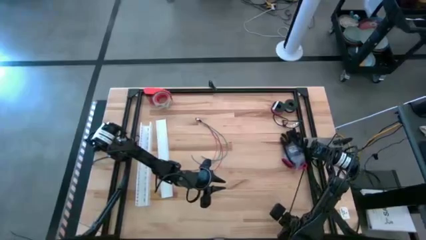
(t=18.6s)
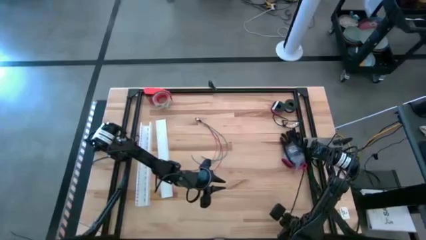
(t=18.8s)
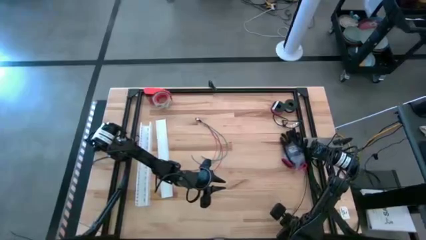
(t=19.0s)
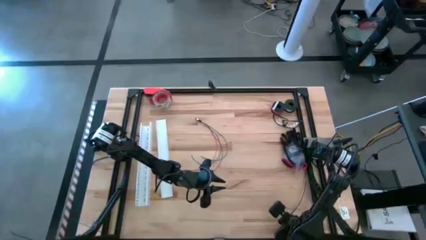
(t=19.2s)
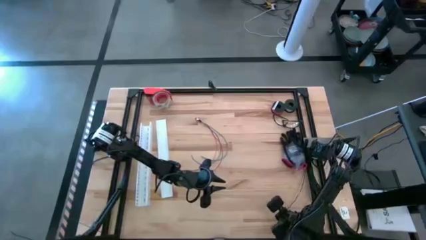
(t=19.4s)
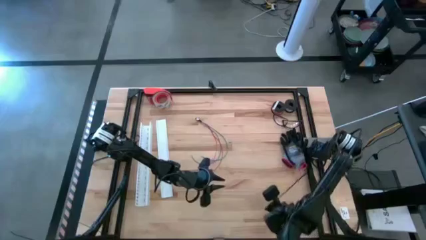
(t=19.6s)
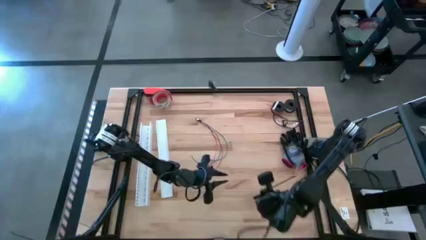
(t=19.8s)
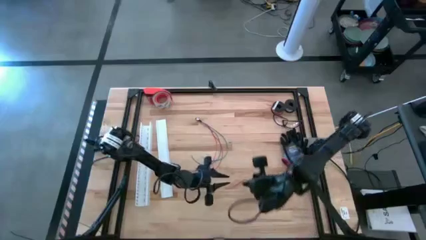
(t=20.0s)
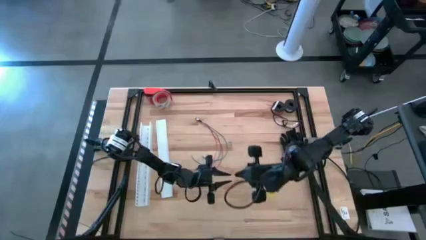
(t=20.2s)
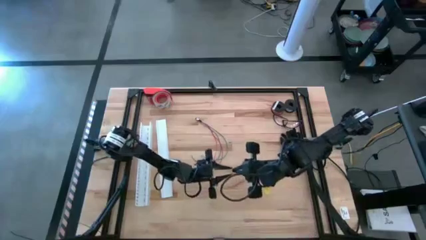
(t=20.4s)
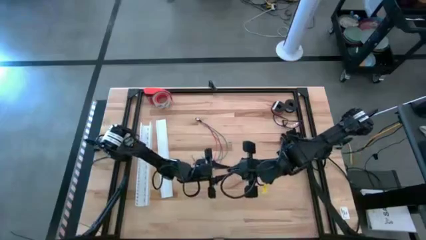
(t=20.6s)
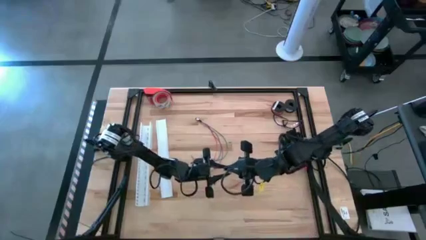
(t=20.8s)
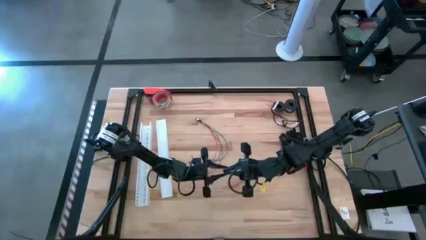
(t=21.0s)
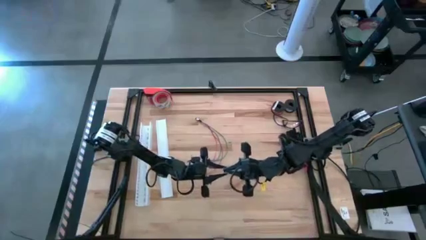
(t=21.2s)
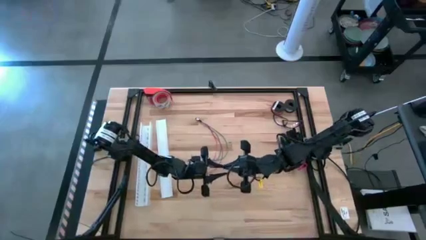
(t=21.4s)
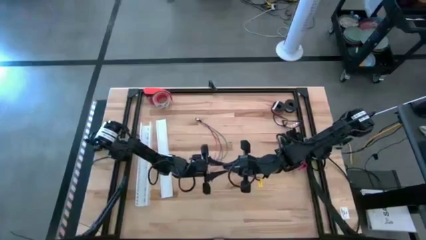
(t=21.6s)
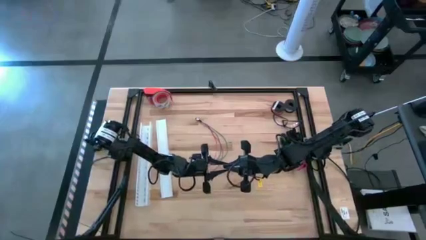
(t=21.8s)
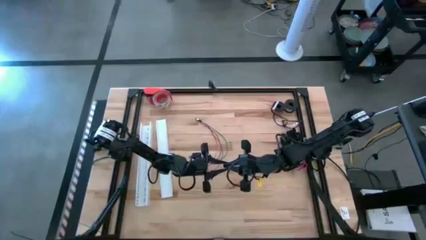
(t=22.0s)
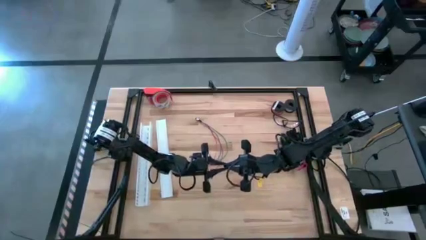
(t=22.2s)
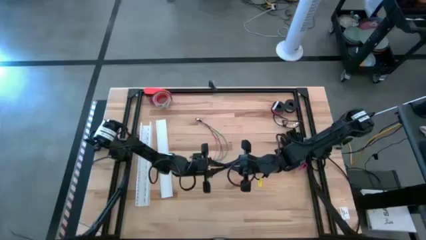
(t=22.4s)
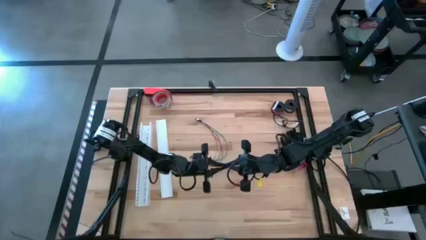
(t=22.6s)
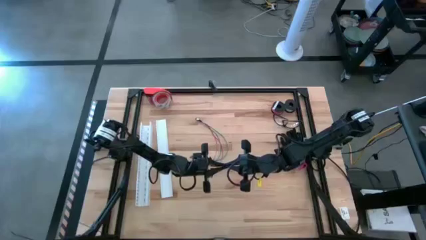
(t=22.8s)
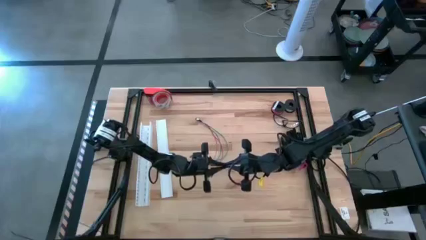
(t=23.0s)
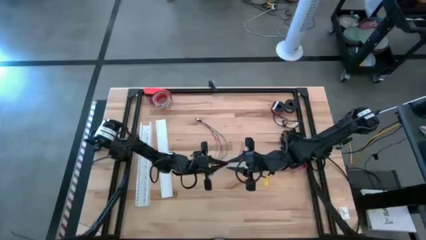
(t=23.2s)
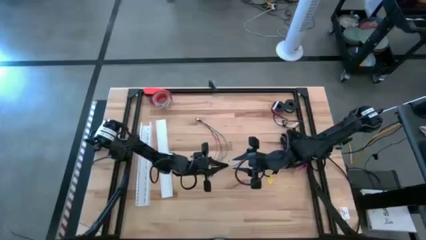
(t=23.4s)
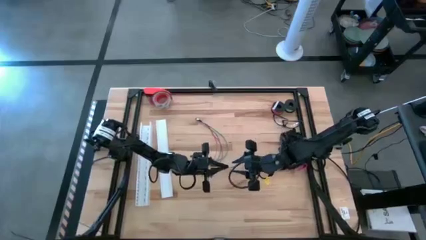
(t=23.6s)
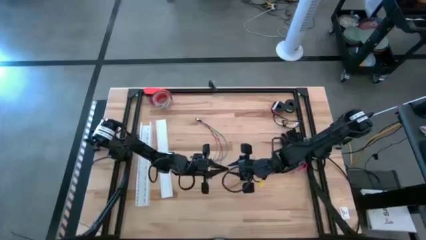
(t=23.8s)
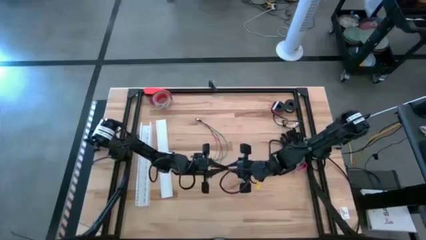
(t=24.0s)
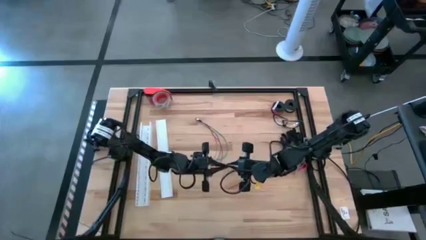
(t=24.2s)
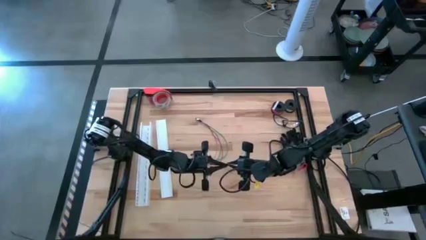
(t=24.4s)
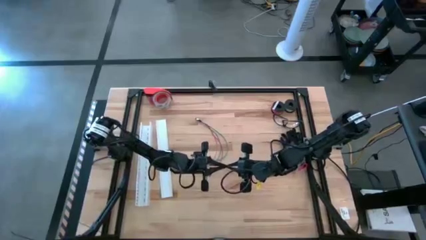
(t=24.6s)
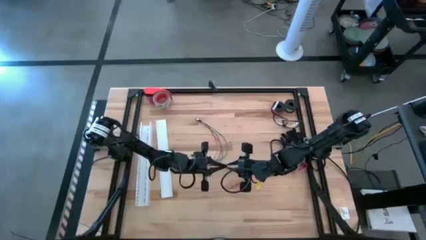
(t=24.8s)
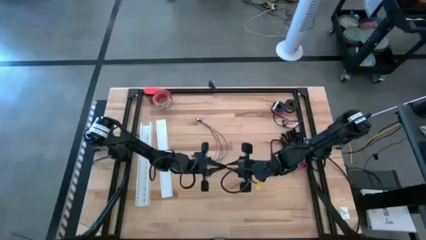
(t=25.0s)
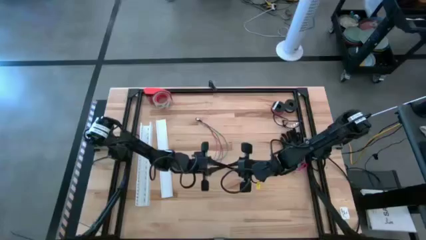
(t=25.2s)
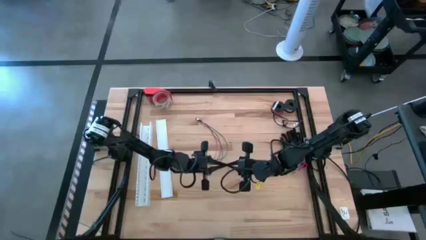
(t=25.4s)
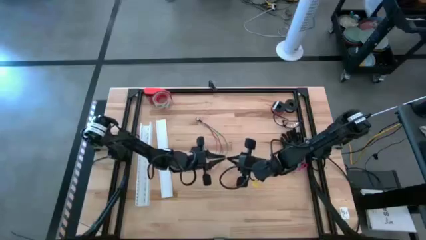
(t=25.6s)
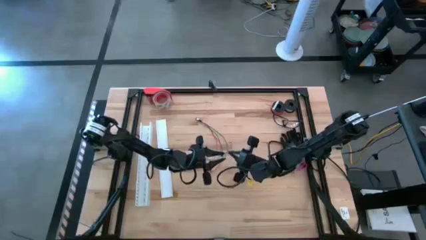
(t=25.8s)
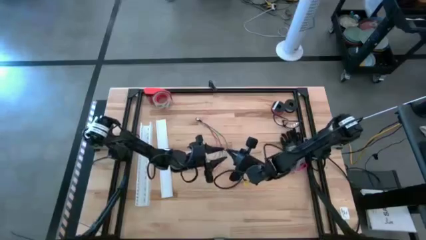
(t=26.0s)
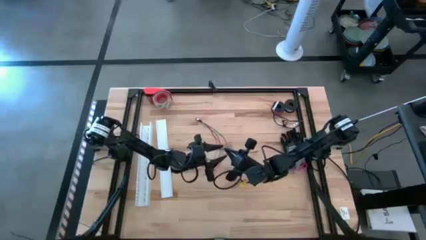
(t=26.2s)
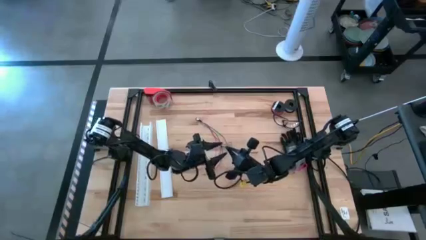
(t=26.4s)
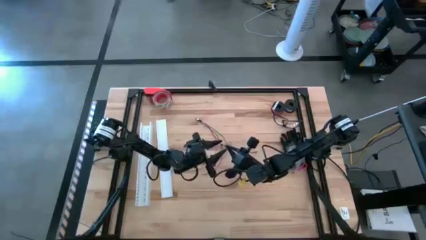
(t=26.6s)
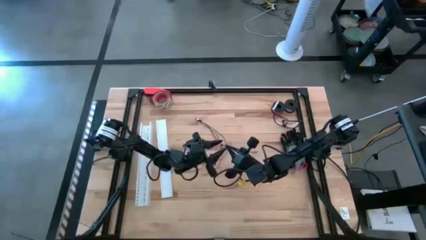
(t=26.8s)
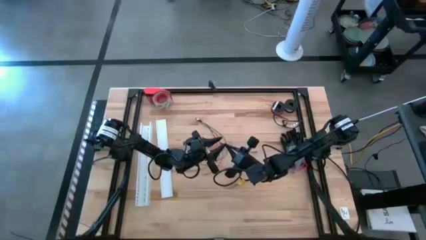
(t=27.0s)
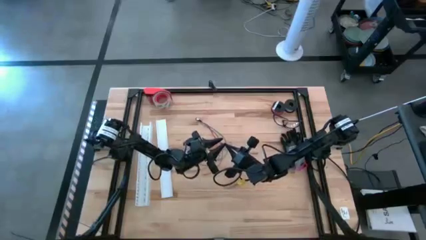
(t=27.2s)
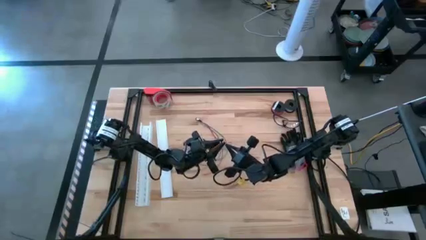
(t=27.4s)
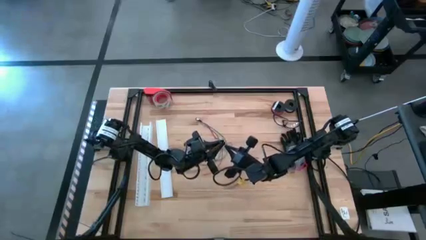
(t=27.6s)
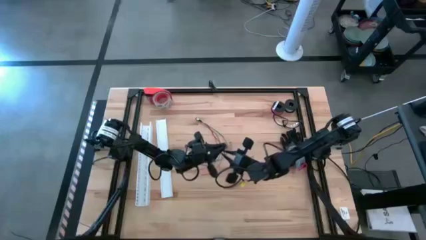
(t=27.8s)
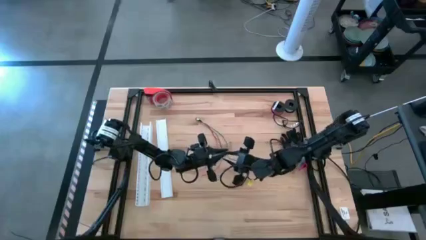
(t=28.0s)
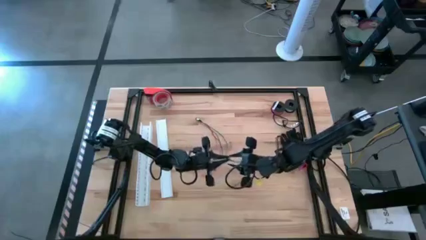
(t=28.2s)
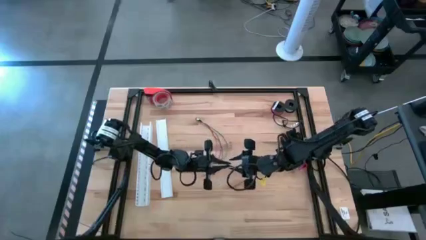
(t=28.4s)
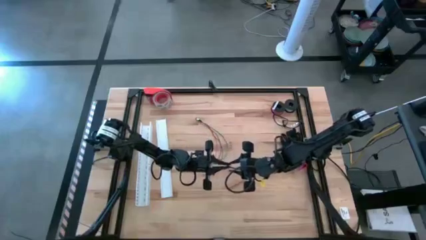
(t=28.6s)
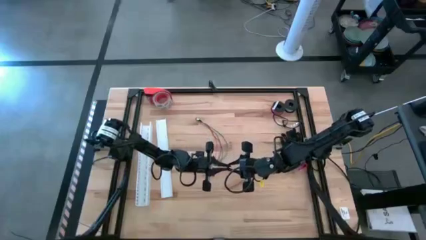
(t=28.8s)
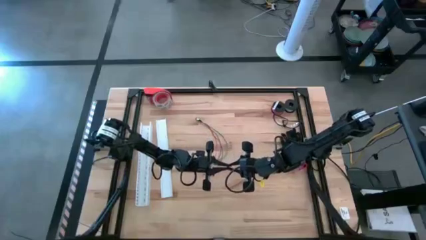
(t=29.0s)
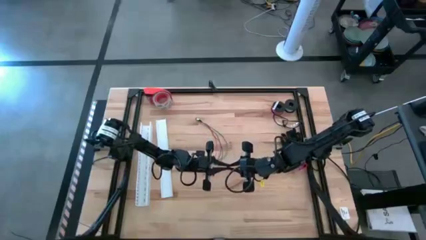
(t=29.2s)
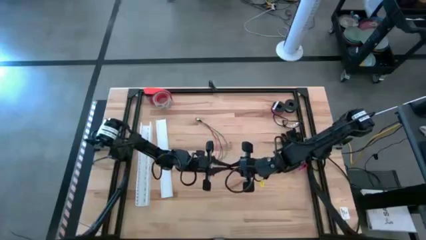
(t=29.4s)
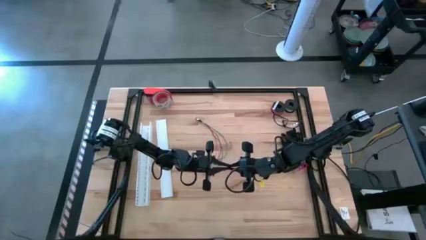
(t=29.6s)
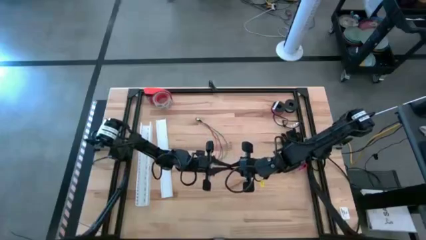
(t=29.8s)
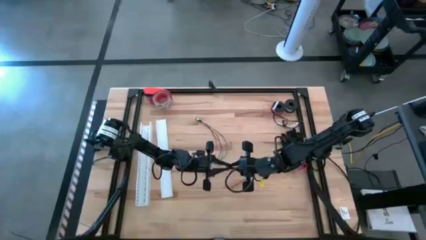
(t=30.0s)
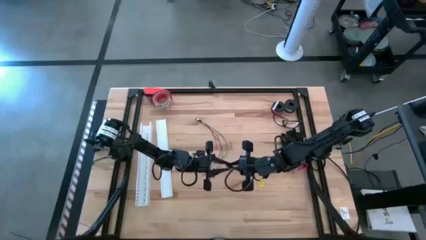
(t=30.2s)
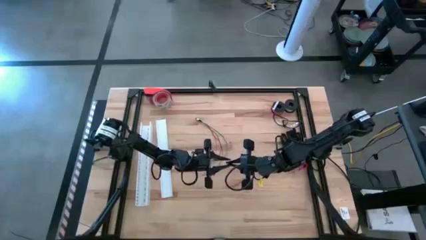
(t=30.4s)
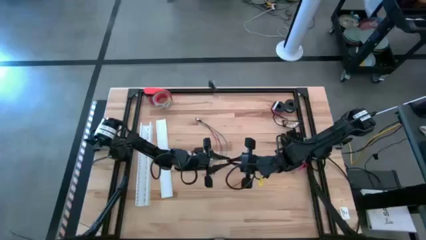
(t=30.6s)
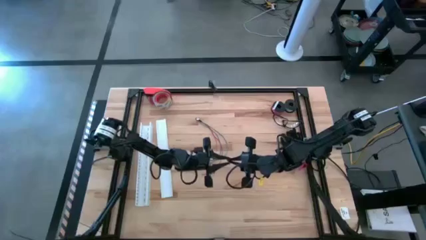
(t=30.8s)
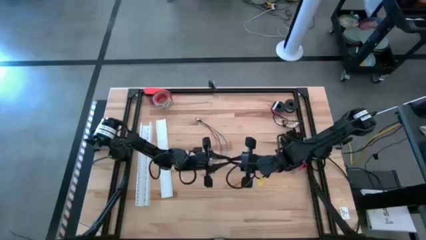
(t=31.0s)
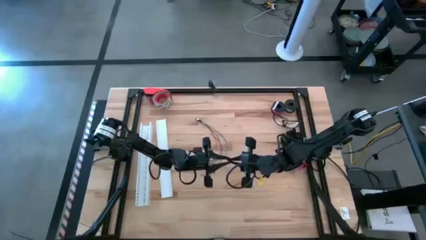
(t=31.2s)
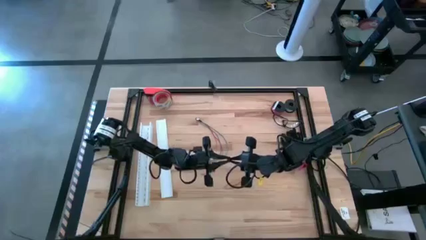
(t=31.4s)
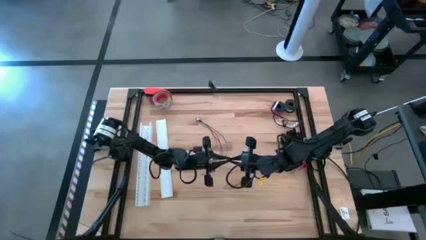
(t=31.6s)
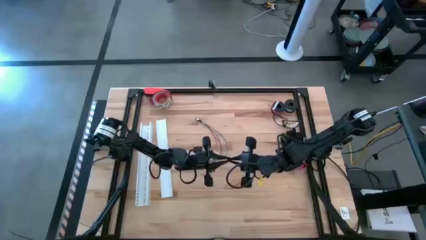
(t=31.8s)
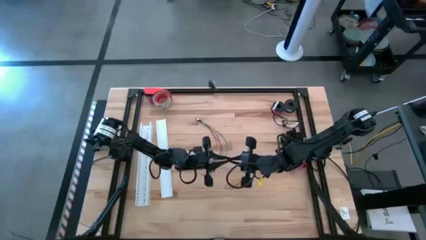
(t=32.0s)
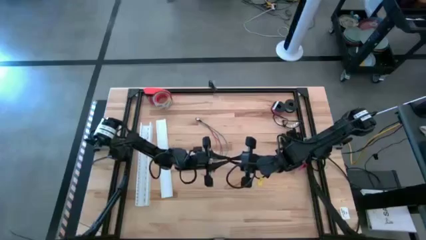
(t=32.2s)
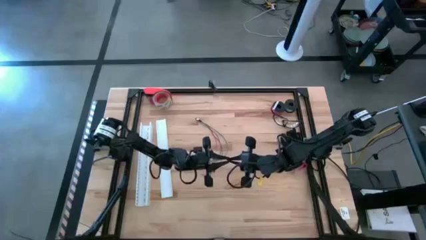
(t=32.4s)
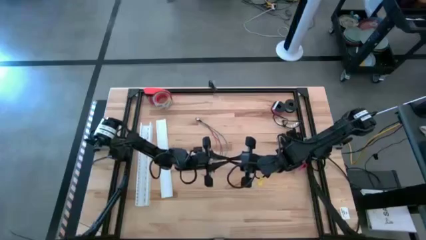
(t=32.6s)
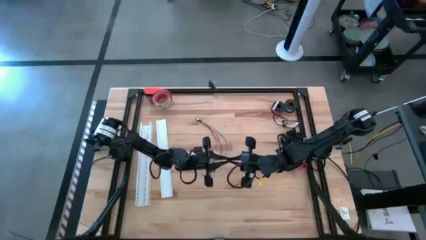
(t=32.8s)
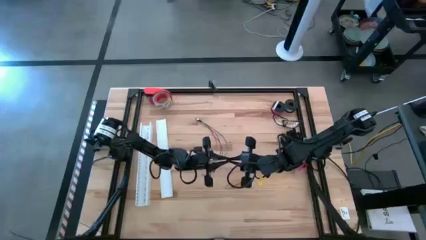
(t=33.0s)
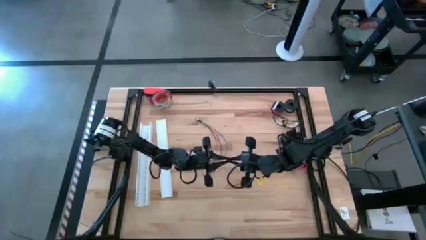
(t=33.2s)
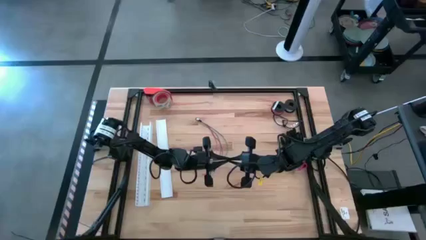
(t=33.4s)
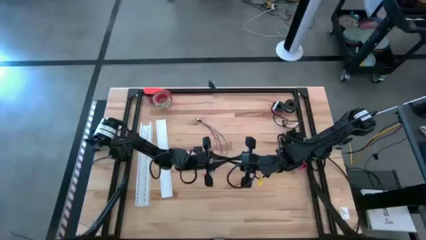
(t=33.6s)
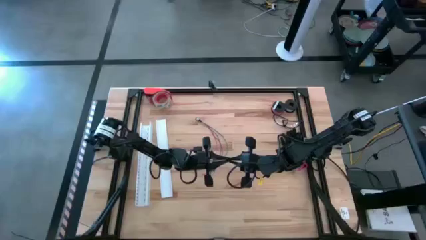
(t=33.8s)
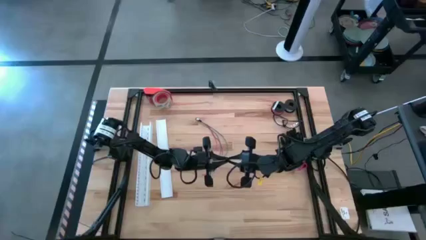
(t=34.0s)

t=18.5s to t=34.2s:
Task: Ziptie cables
Wrap the black zip tie around the cables
